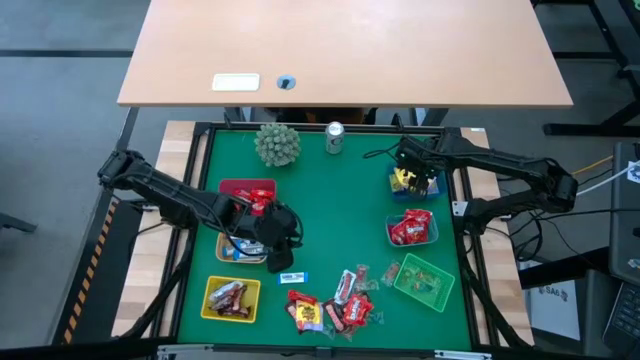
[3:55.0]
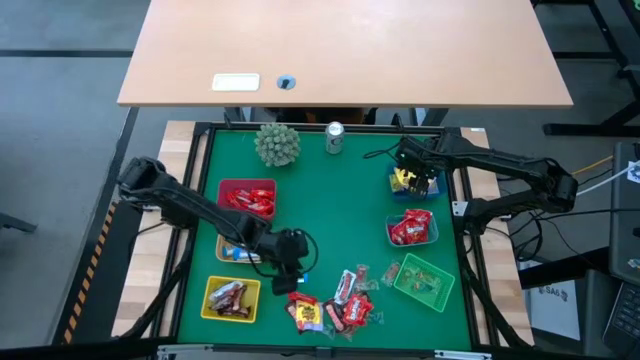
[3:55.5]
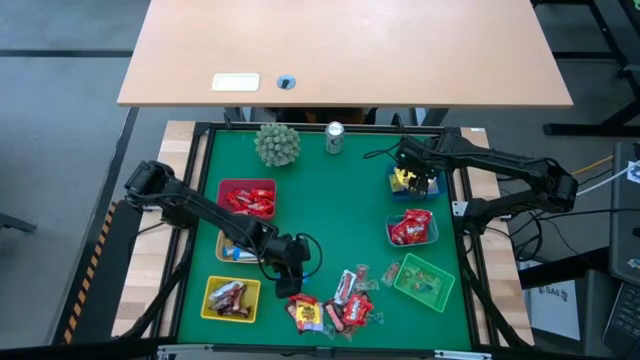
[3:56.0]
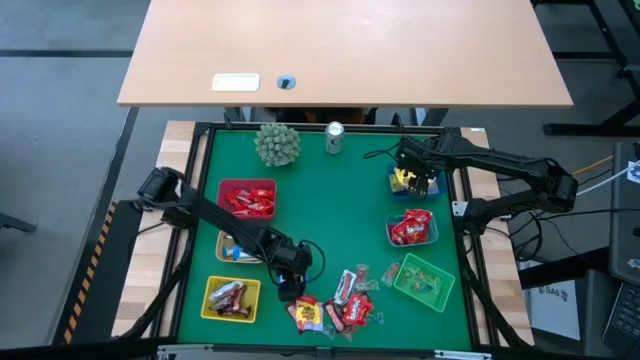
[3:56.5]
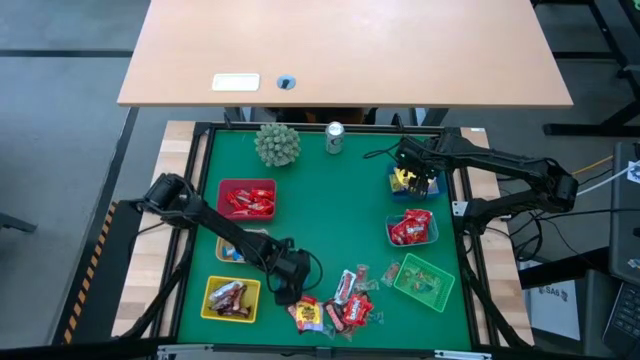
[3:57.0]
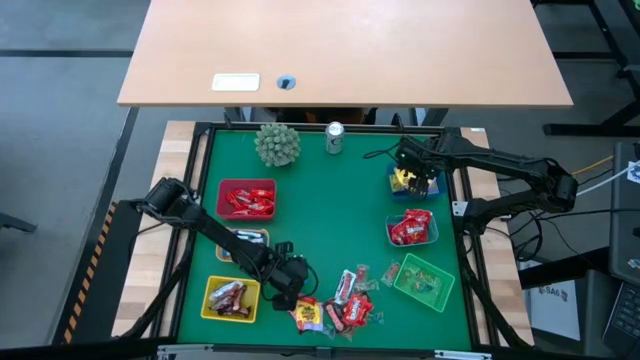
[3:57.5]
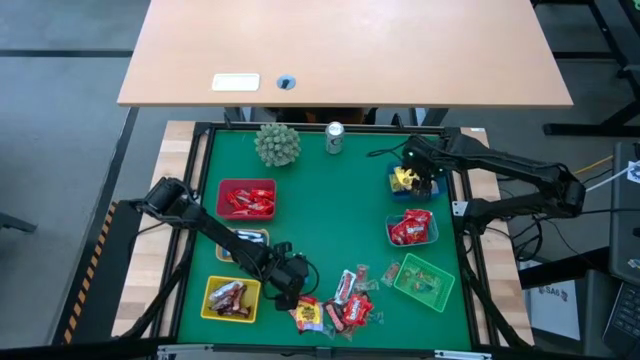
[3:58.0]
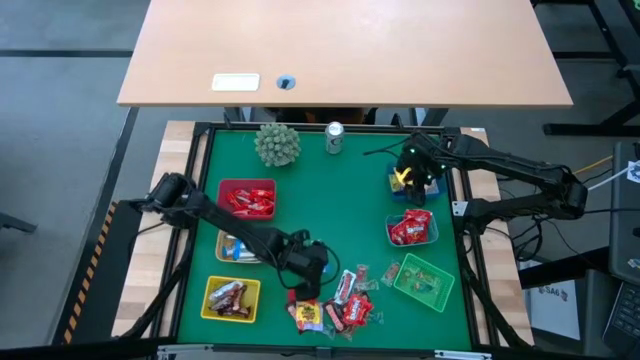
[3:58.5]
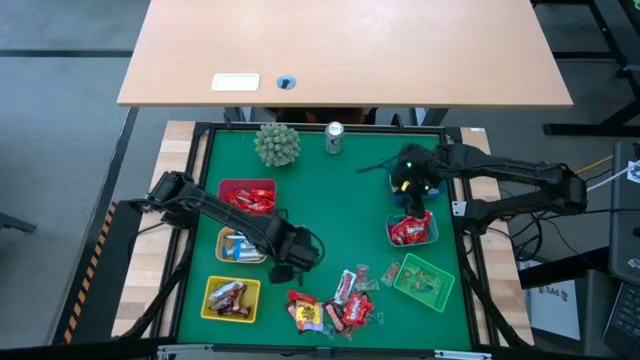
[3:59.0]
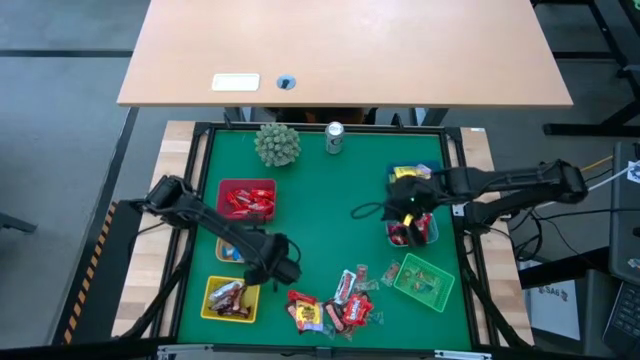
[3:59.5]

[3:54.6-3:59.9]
Task: Sort candy
Put the white chocolate bar into the orange bin

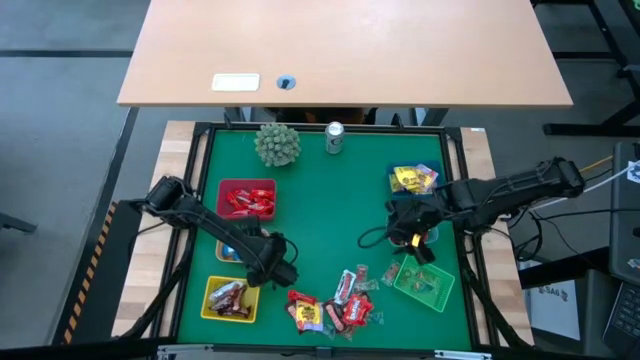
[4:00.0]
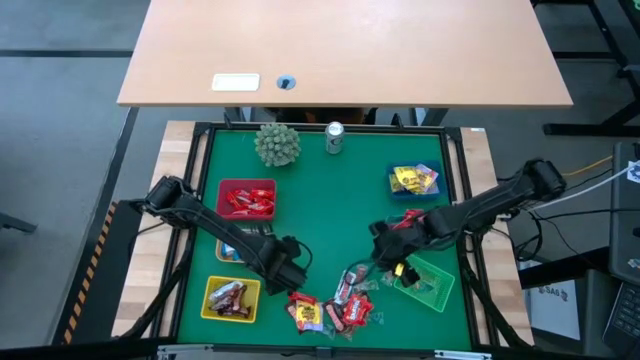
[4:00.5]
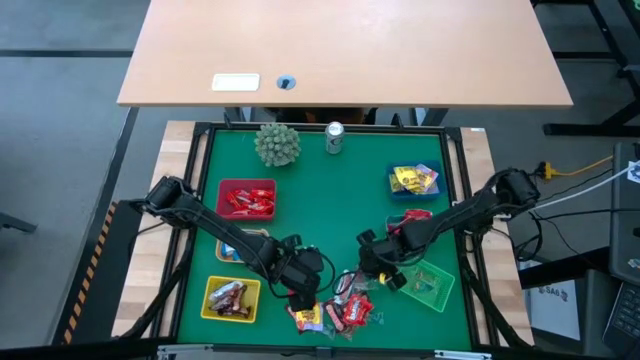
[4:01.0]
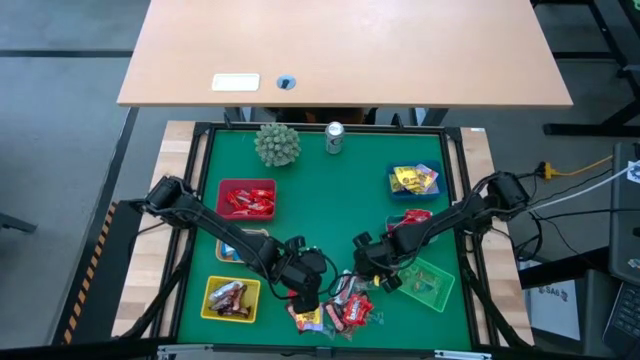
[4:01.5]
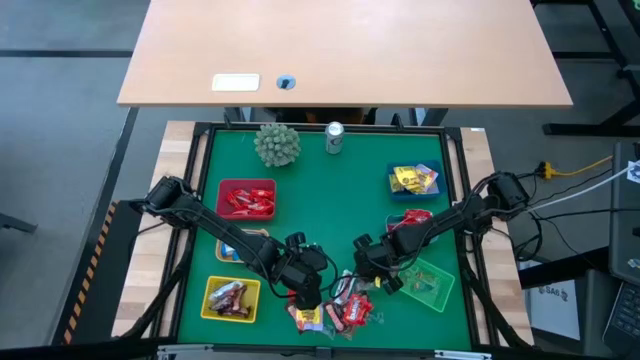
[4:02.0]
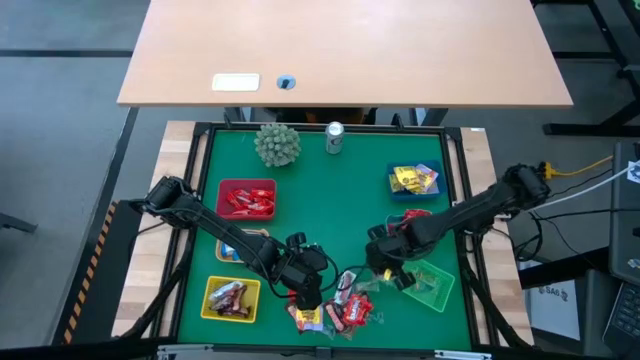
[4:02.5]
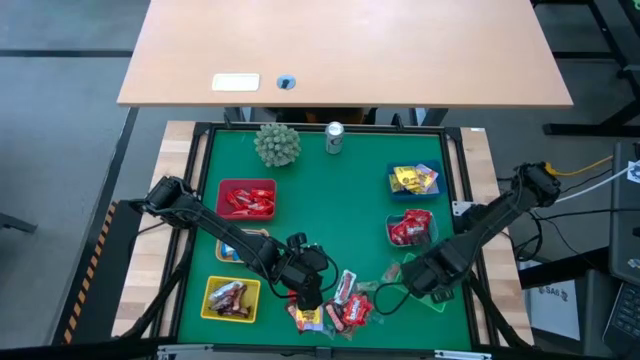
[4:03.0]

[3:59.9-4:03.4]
Put the red gummy into the green bin

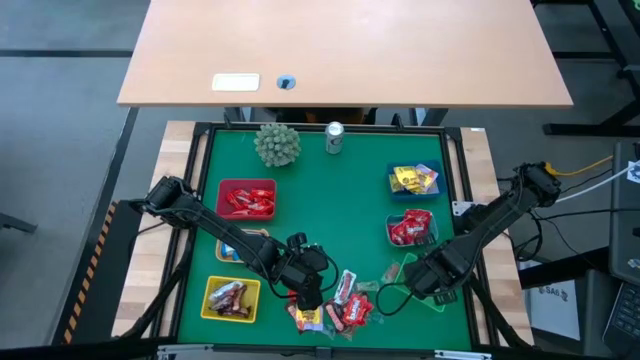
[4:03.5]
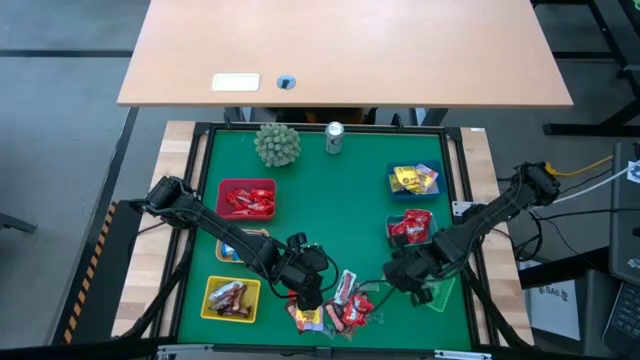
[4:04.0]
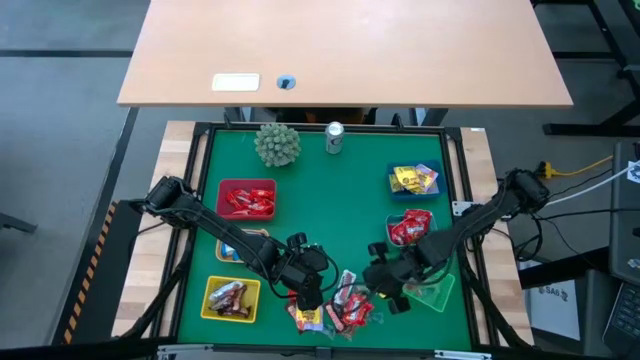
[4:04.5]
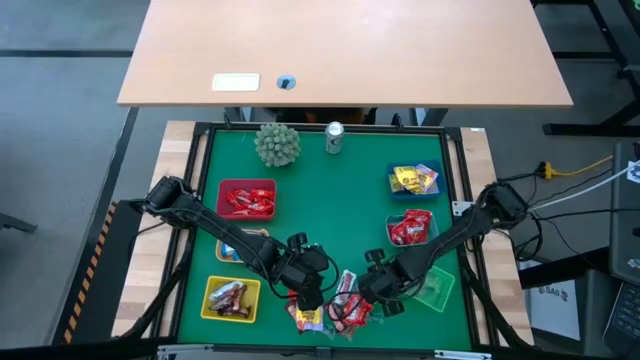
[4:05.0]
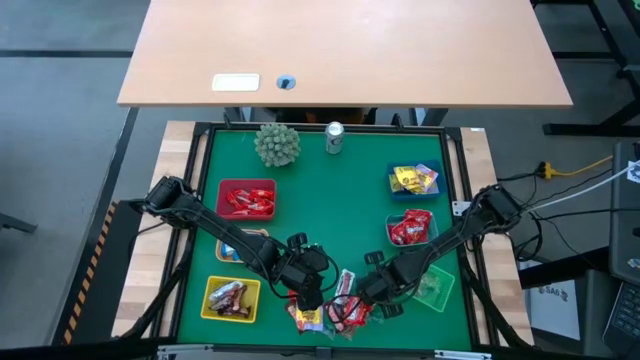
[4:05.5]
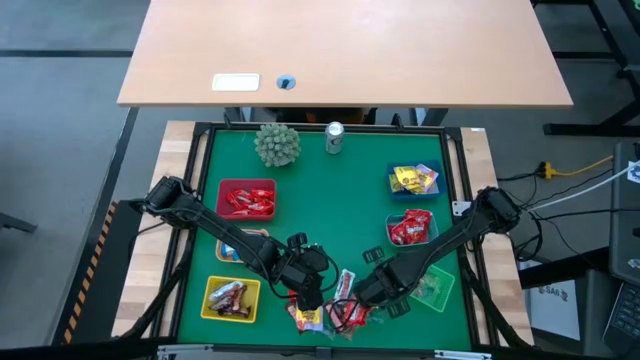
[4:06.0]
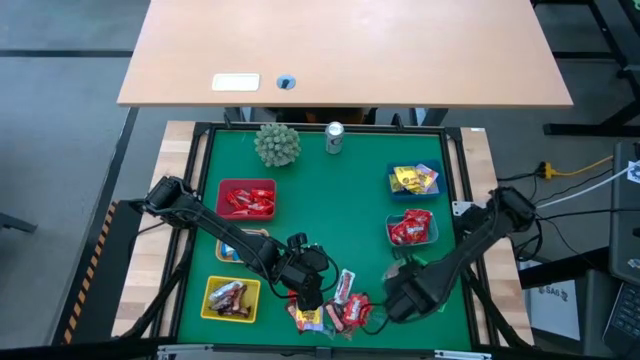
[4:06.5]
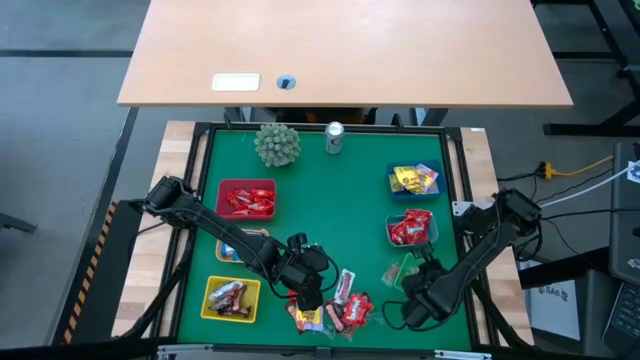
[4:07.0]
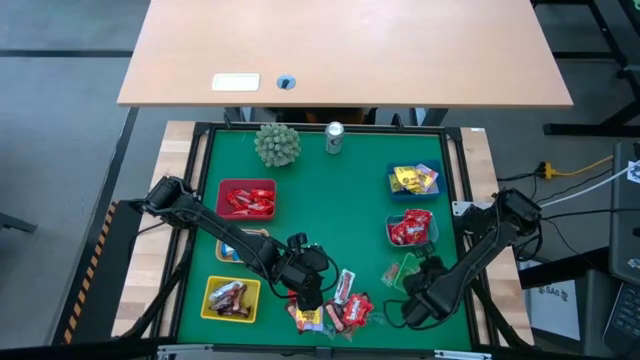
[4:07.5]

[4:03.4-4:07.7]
Put the green gummy into the green bin

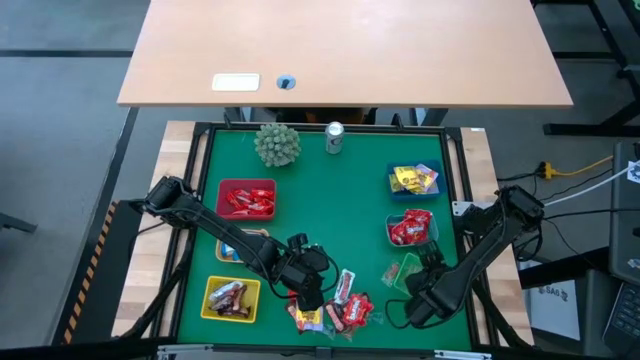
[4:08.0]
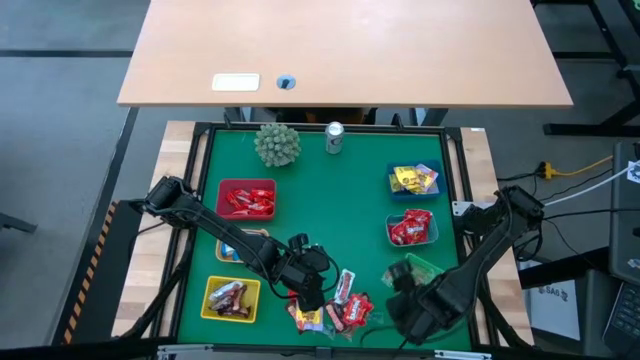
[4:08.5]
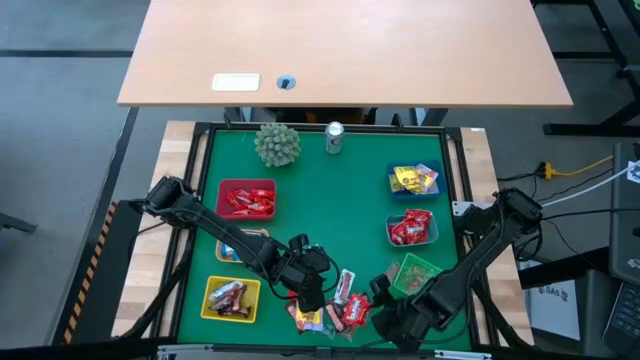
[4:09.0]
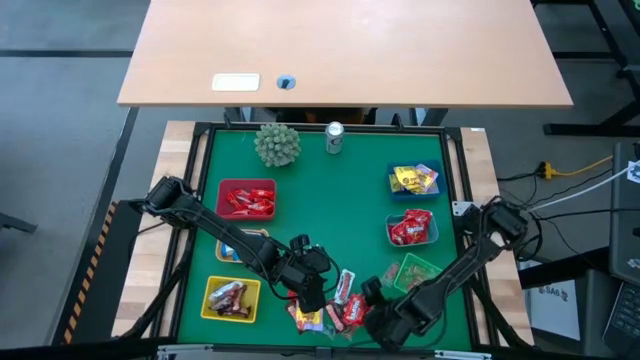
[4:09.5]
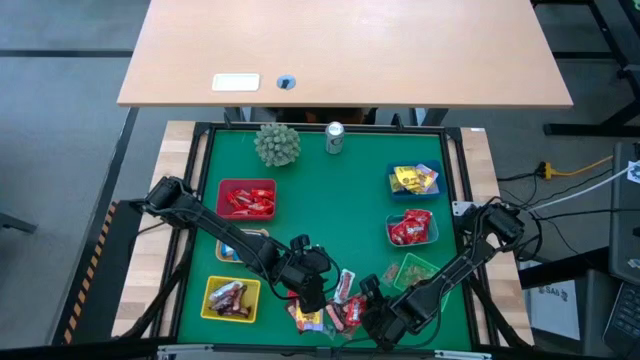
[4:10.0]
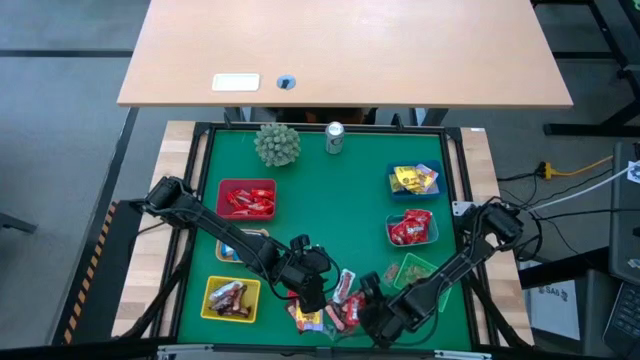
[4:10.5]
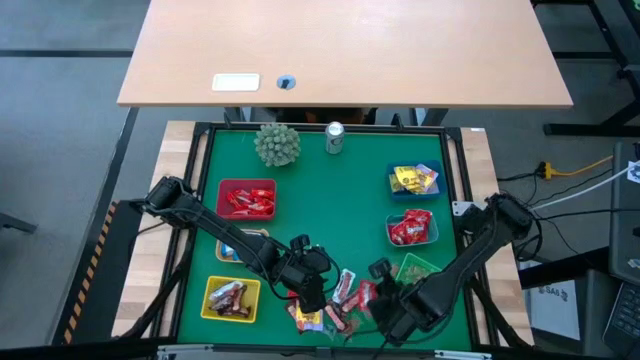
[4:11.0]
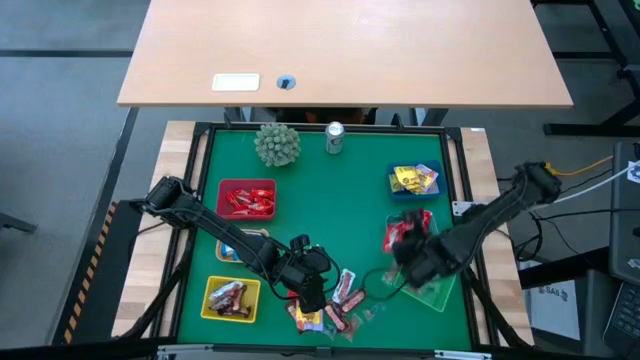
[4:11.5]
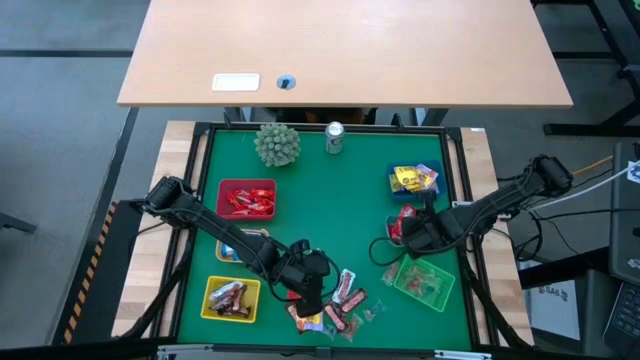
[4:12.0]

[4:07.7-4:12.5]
Put the red candy into the light blue bin

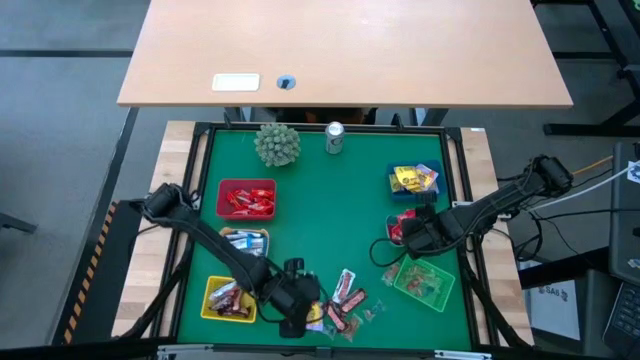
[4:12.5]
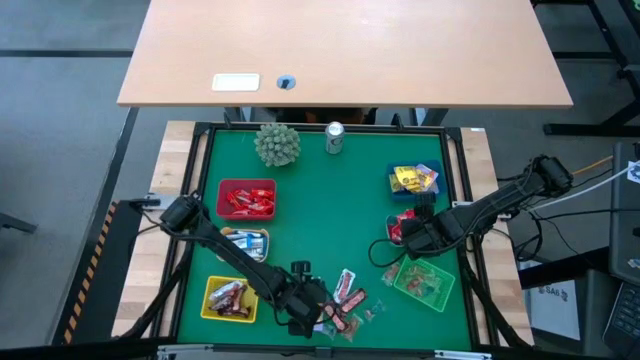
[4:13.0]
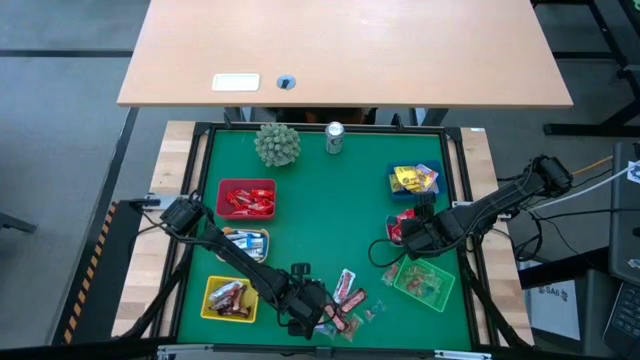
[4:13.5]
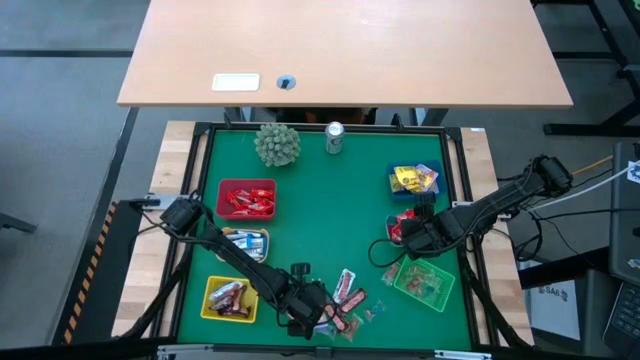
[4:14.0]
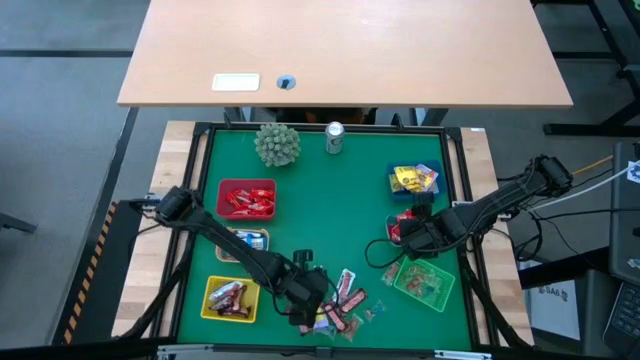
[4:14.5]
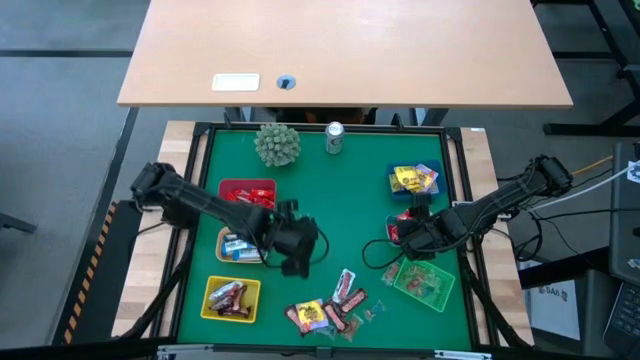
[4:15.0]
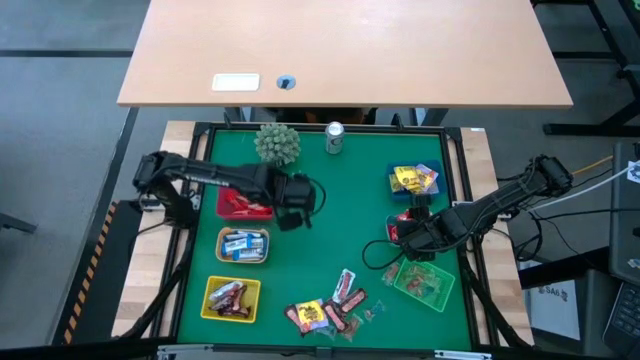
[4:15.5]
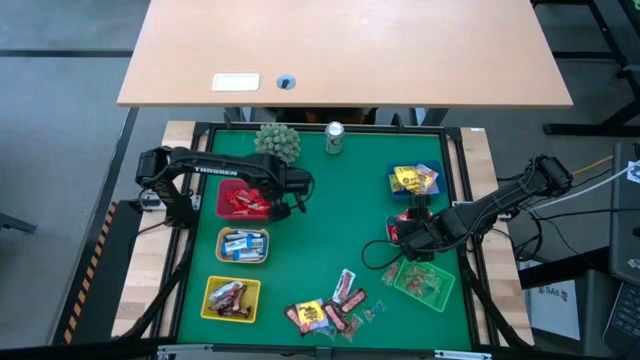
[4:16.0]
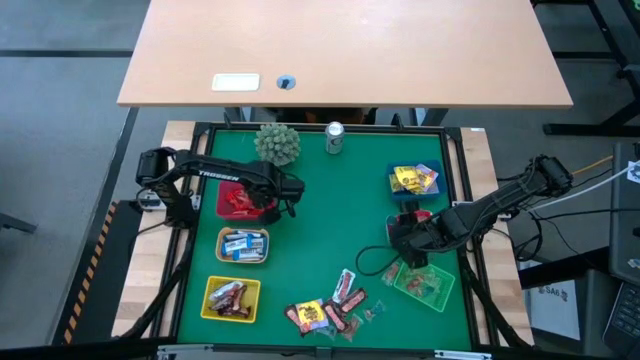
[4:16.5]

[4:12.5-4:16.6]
Put the red chocolate bar into the red bin
